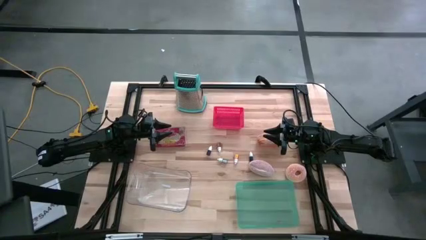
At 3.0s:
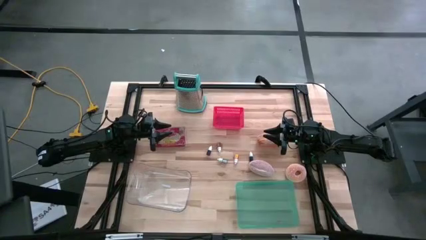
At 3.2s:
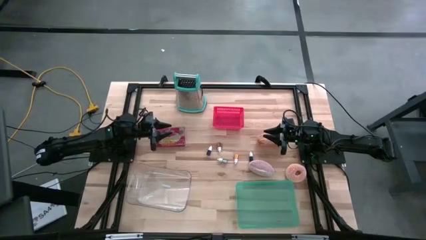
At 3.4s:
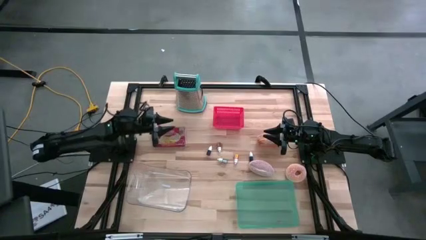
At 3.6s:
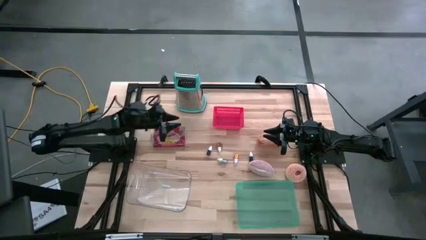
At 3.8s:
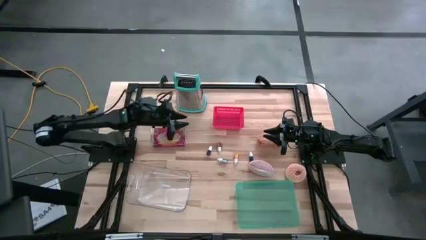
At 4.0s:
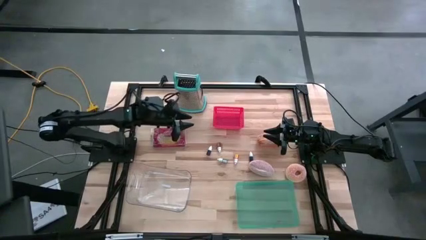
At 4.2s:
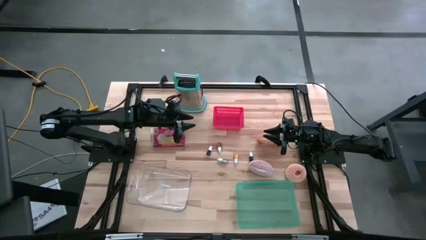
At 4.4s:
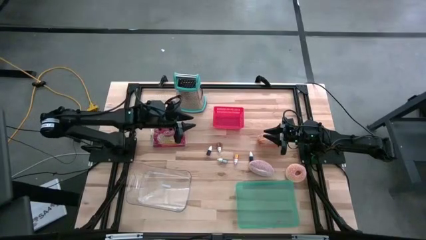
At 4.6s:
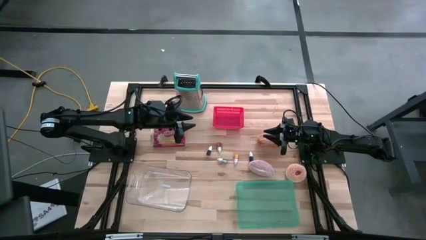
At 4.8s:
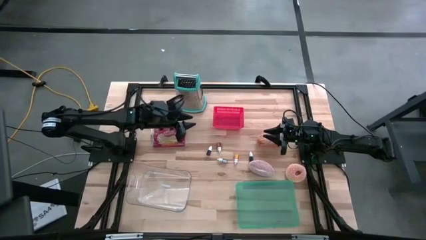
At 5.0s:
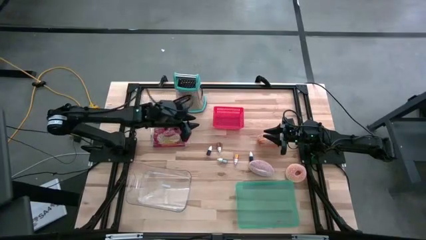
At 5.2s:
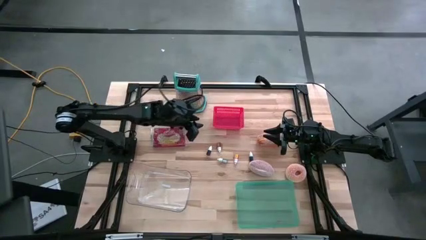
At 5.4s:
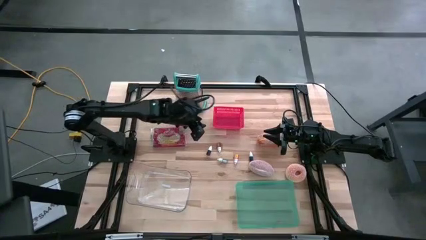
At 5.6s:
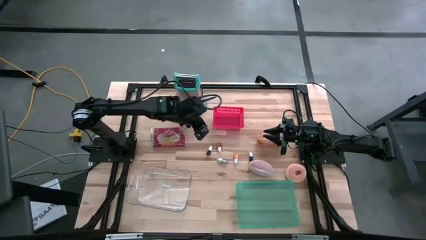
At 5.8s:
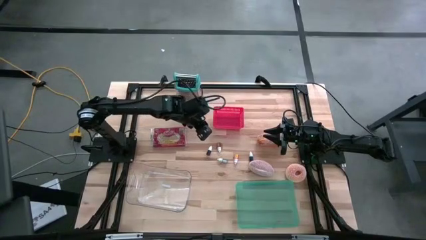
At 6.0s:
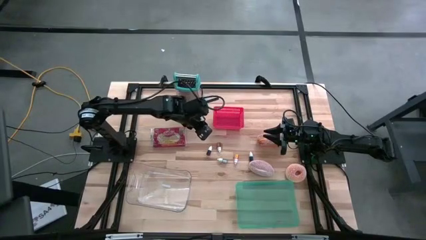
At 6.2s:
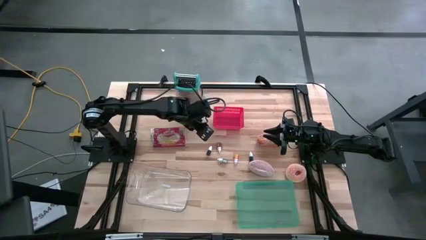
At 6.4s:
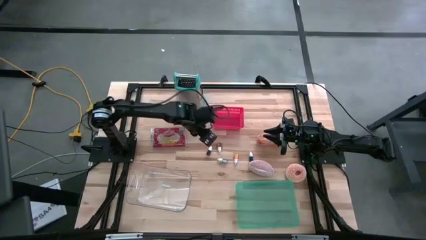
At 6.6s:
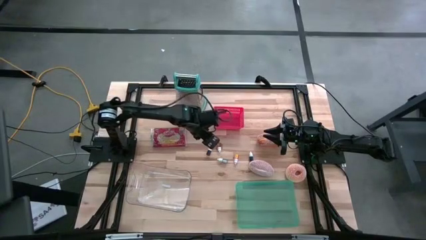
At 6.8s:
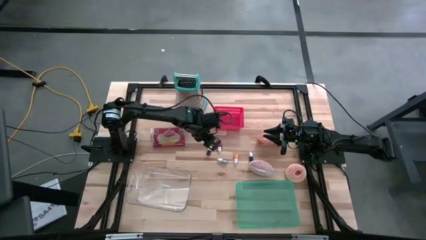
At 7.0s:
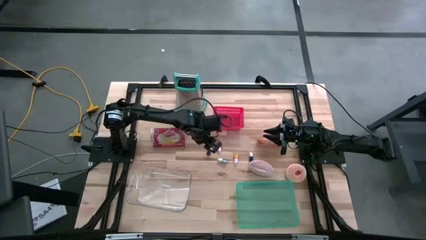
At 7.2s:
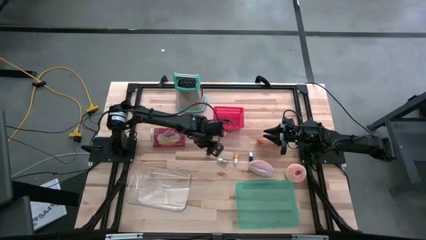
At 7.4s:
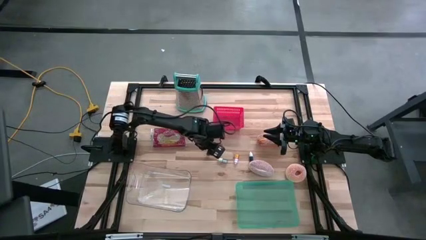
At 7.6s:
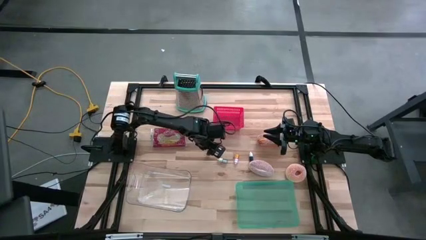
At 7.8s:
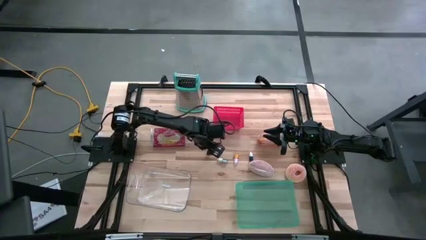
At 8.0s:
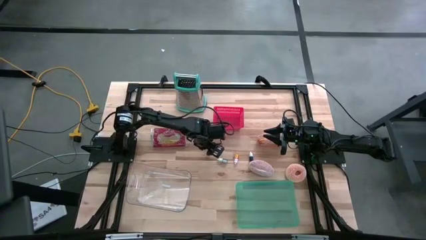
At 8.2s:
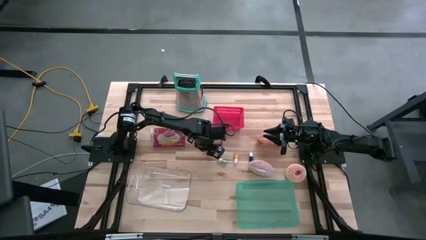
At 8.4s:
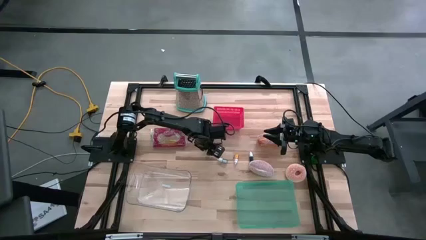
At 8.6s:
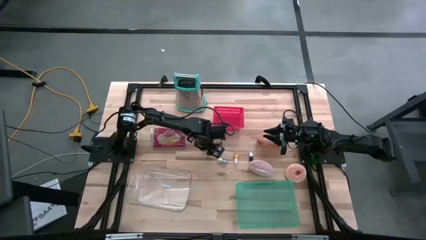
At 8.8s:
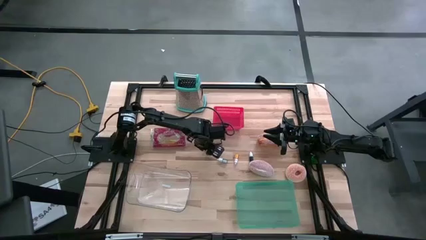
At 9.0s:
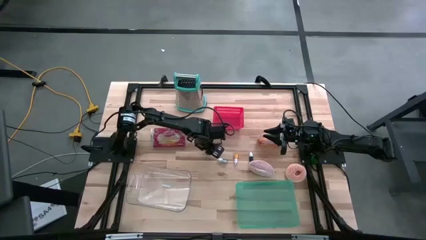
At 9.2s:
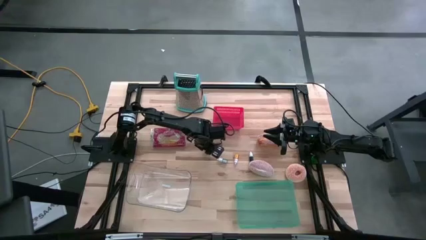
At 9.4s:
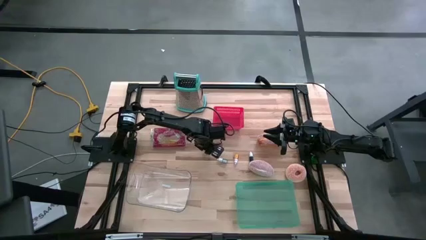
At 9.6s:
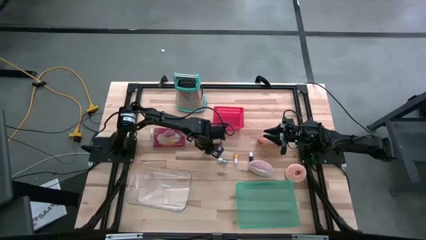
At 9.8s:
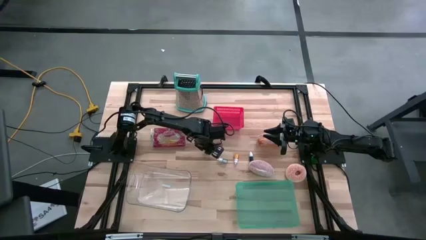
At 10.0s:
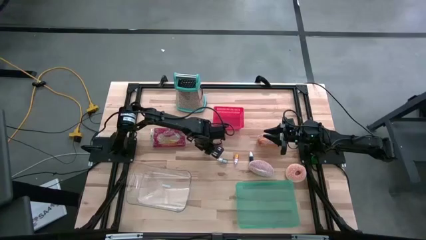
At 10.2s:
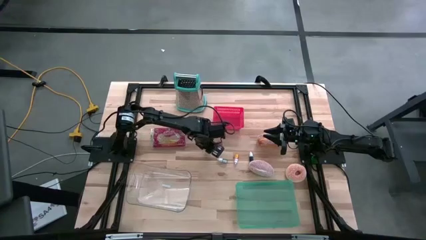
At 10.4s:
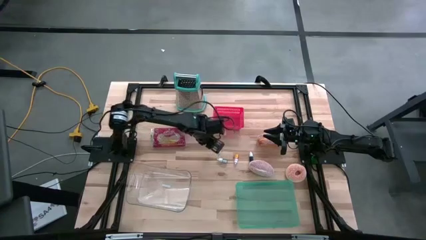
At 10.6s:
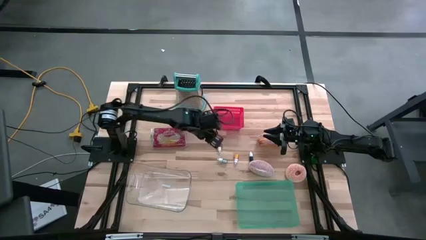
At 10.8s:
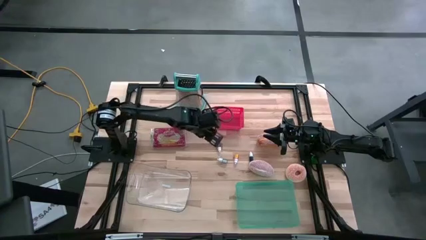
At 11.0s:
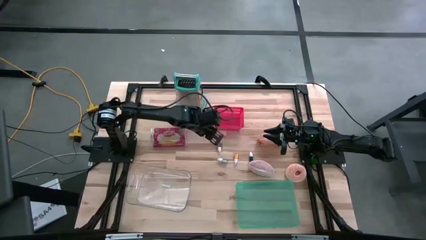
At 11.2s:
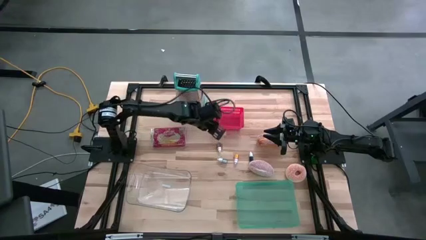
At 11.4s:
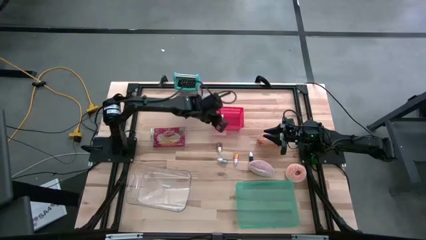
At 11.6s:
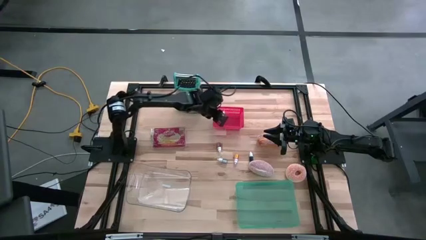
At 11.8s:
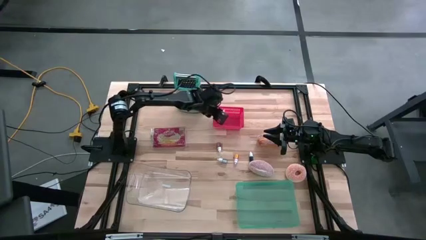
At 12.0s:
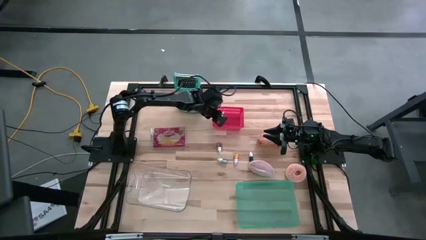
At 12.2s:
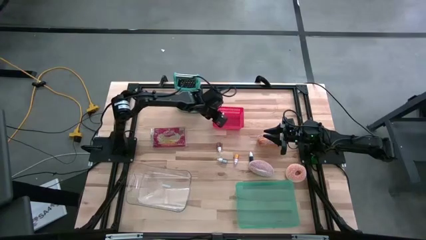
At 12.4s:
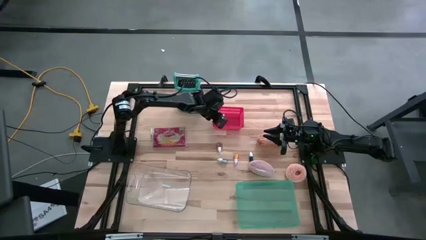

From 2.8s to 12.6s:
Put the food coloring into the red bin

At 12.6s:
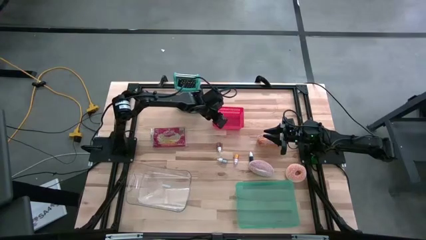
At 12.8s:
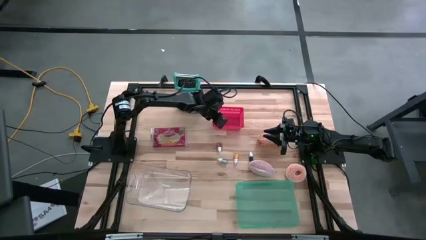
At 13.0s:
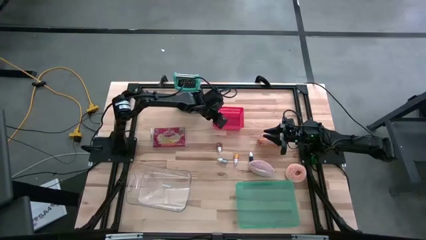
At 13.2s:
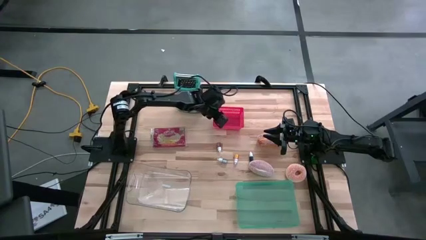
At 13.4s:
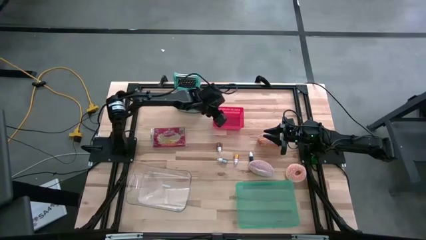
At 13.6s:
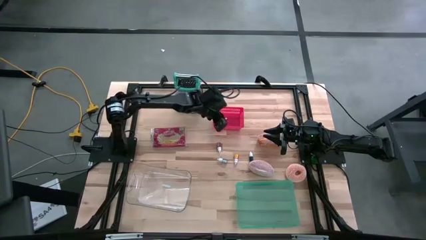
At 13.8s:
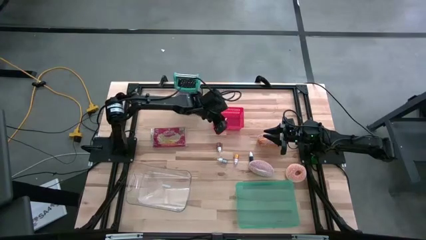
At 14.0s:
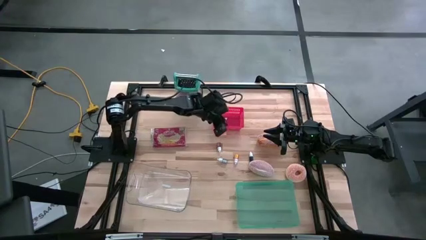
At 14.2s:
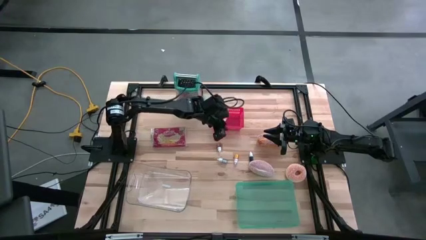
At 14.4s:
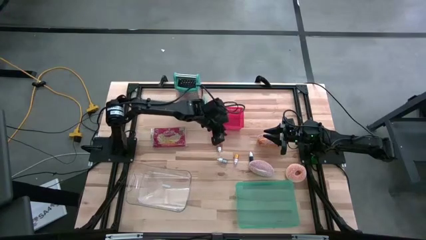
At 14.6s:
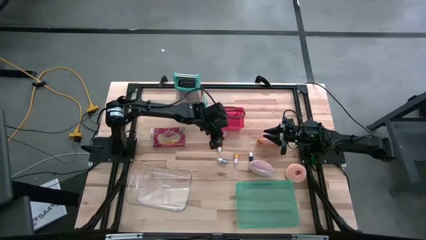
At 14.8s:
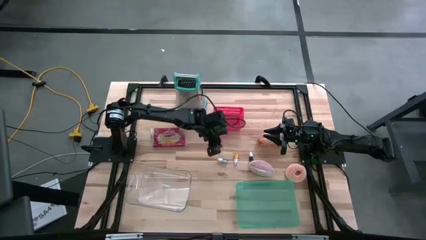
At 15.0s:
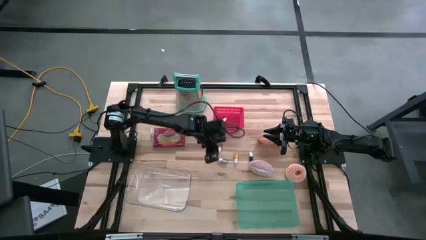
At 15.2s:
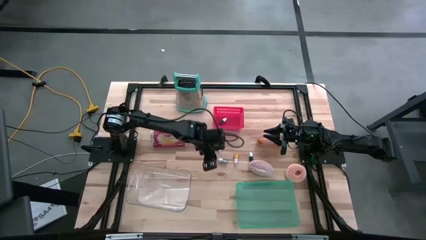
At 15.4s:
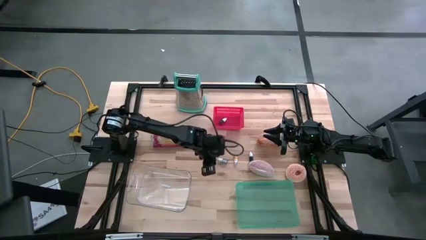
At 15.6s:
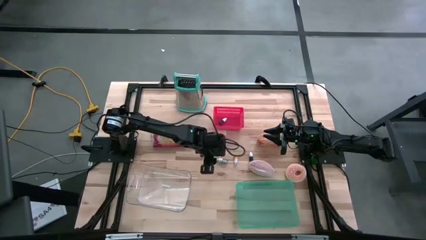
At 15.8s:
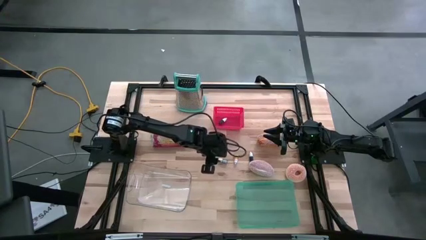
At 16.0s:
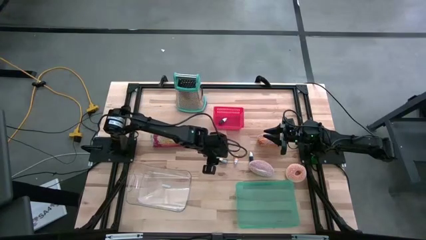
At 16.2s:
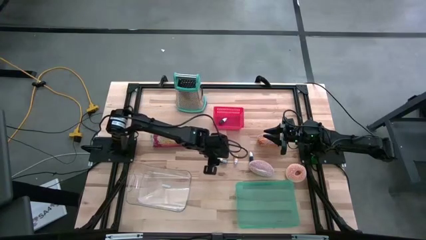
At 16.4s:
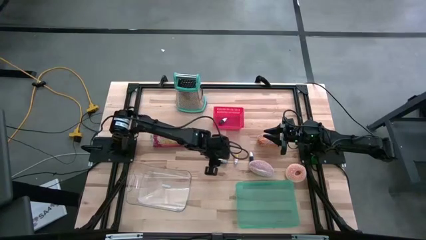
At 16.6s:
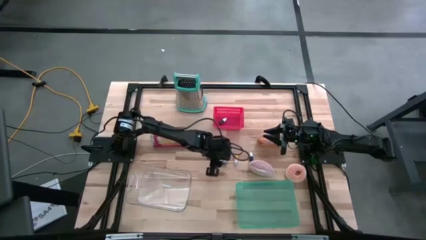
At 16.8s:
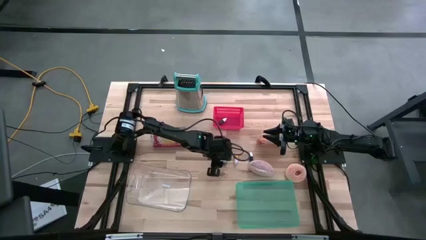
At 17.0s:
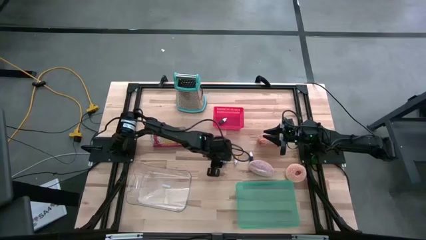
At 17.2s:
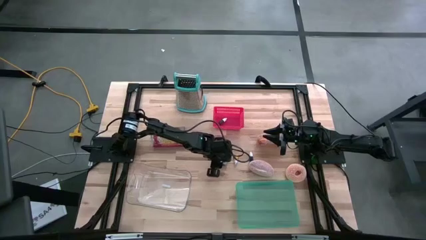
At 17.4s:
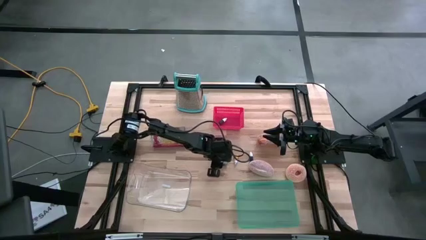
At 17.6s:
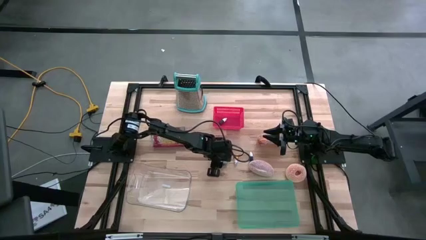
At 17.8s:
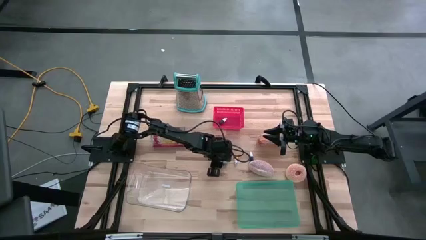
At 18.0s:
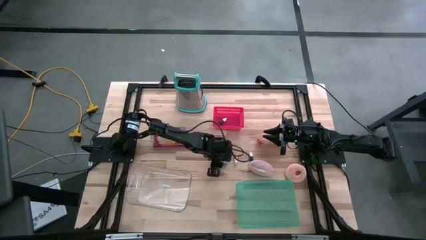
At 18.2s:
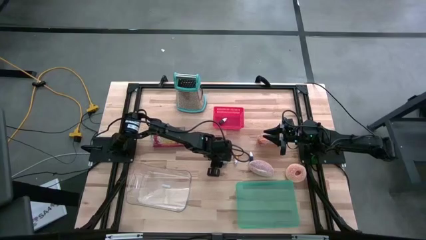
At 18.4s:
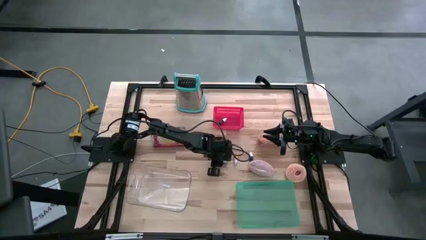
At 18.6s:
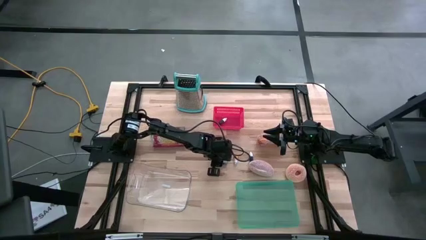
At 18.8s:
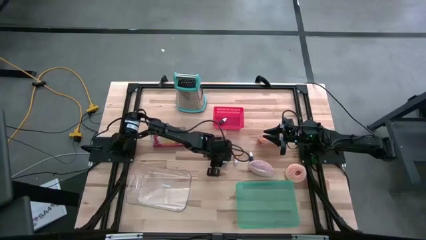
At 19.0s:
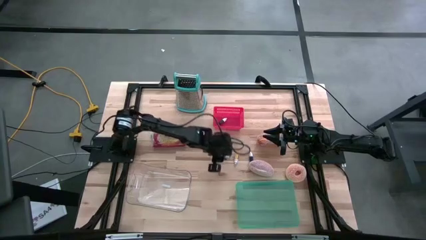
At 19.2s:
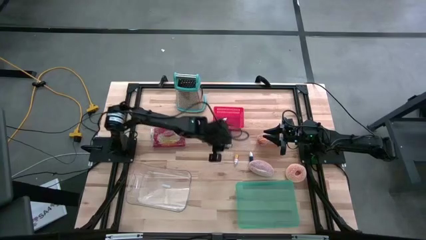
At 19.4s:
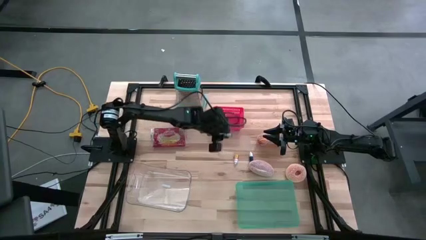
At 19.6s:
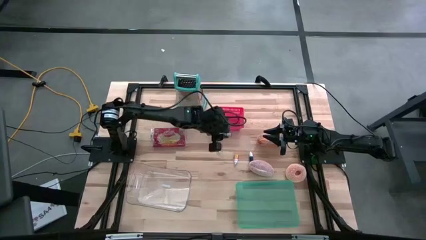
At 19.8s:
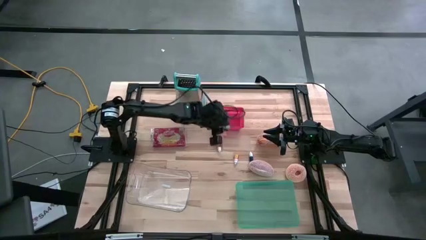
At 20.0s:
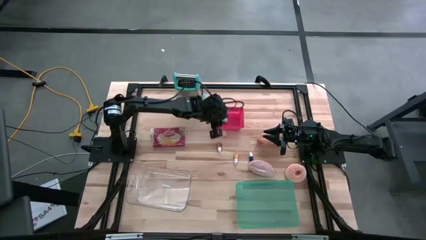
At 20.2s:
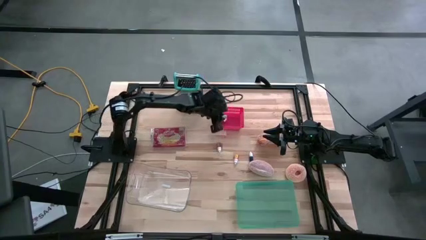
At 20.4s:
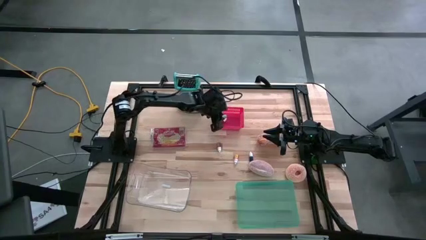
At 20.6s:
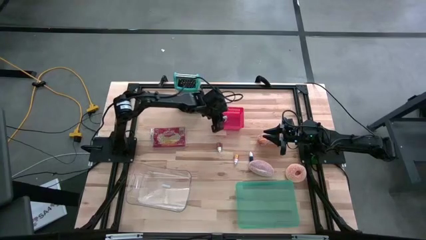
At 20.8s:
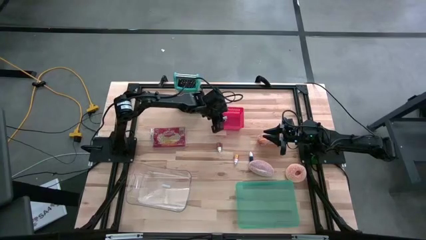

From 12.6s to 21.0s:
Put the food coloring into the red bin
